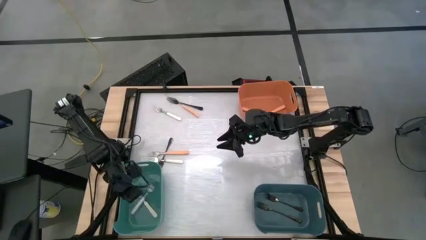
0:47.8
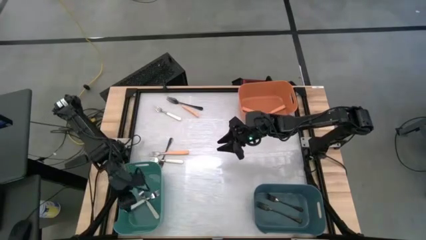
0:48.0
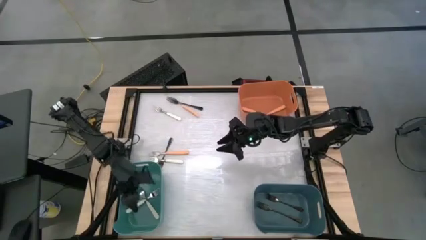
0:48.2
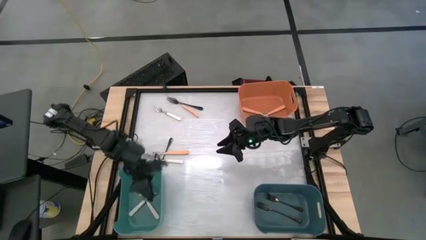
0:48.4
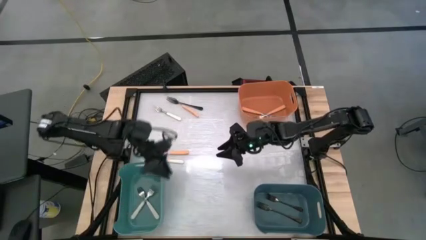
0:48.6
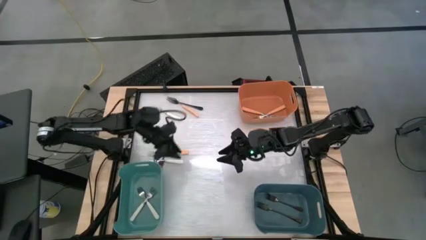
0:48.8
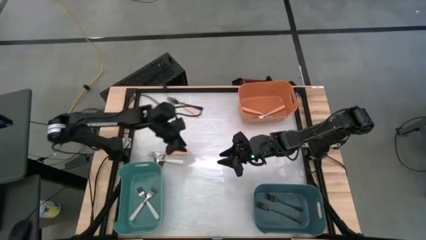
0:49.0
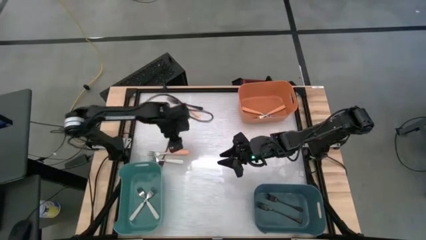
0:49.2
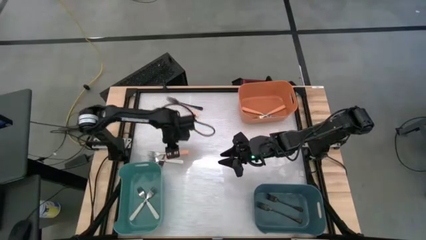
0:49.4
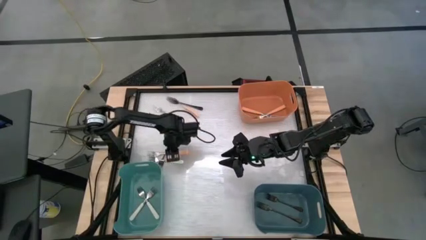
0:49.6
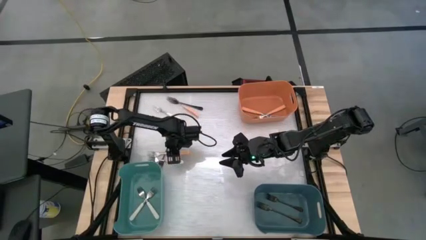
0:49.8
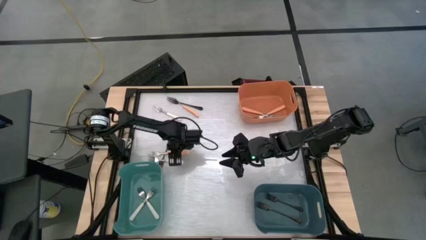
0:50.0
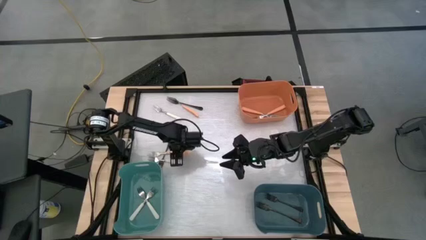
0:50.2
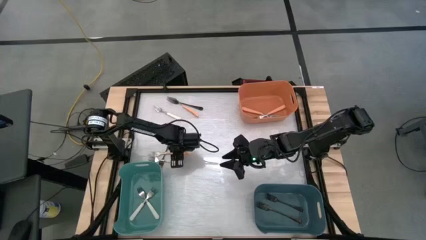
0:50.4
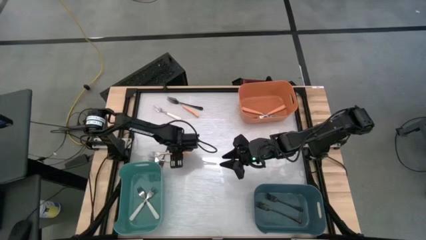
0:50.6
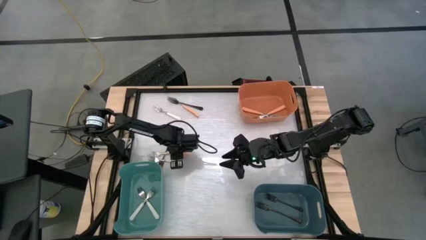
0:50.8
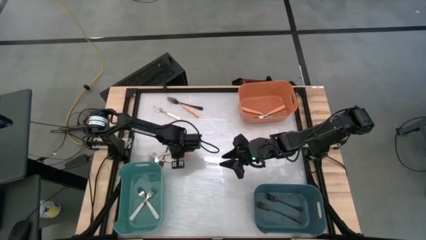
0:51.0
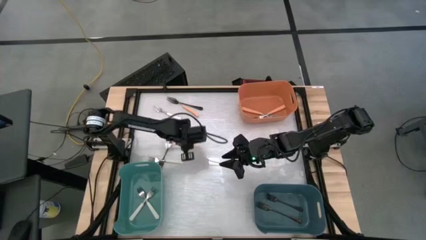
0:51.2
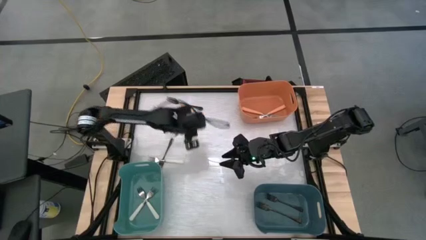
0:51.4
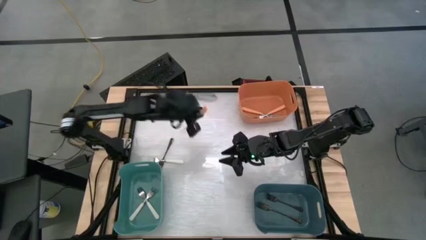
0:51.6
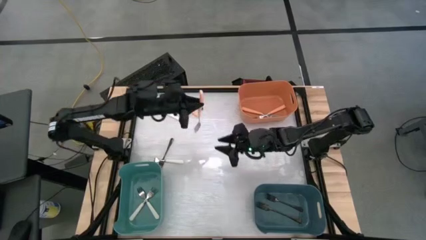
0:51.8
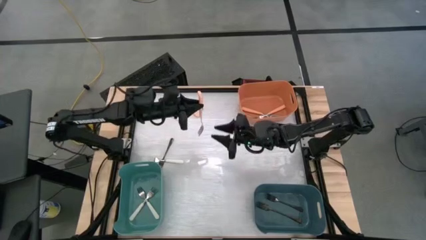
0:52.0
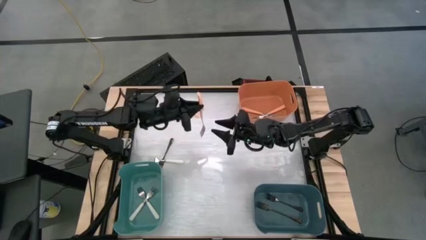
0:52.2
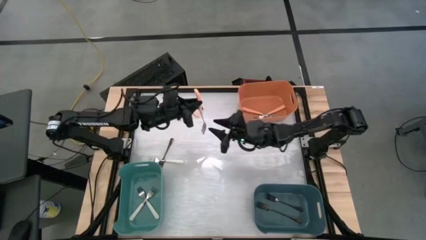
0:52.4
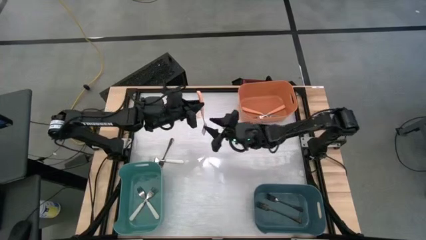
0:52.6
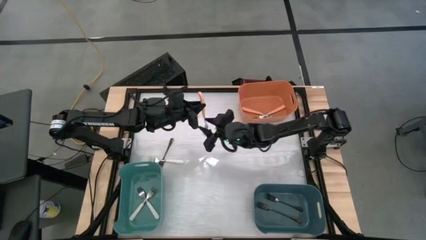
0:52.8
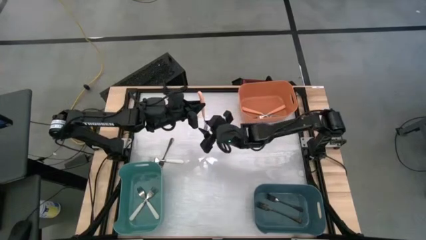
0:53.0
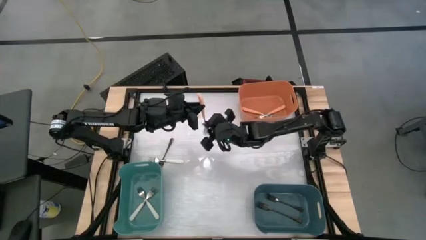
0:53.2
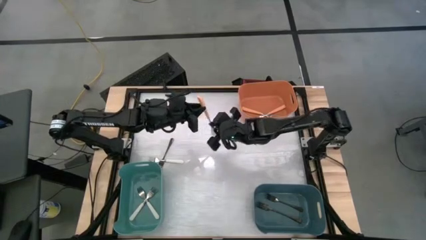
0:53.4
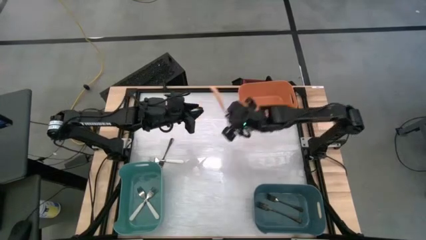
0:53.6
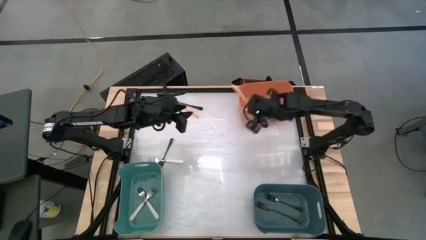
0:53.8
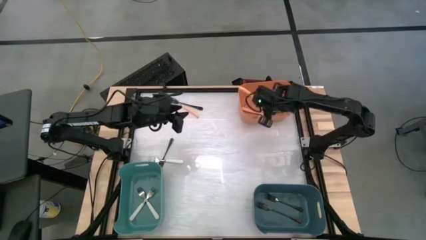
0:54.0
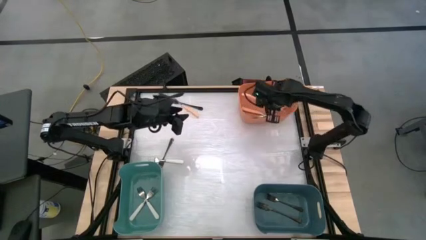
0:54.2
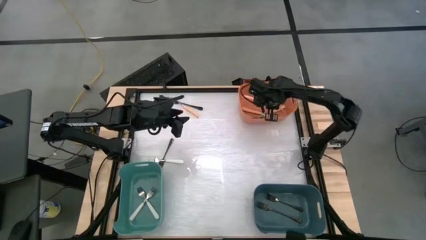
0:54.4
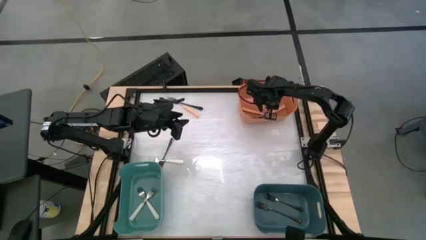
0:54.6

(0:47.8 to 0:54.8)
Task: Sort silverware by color (type)
Put the orange fork into the orange bin

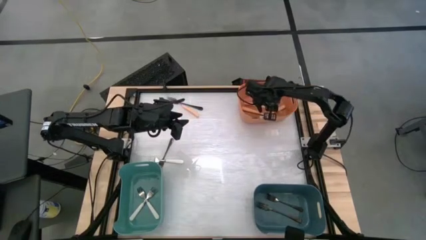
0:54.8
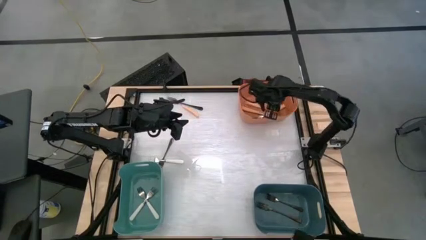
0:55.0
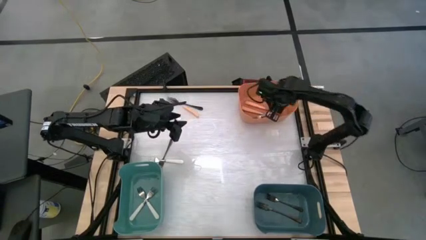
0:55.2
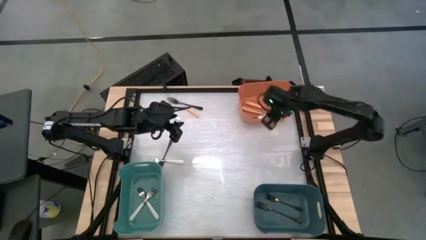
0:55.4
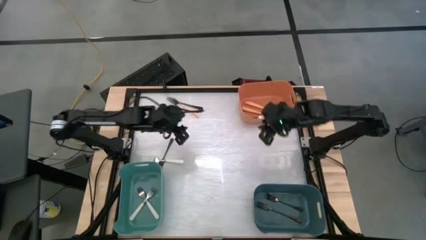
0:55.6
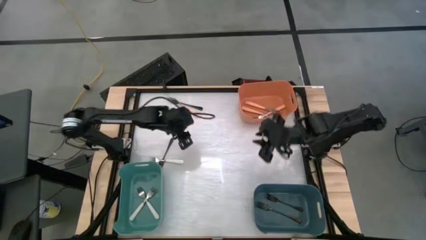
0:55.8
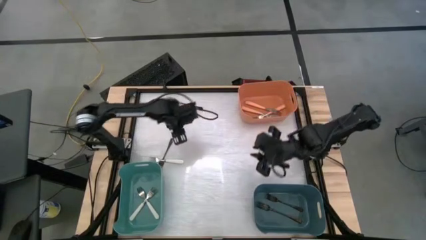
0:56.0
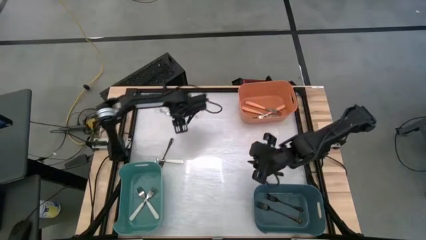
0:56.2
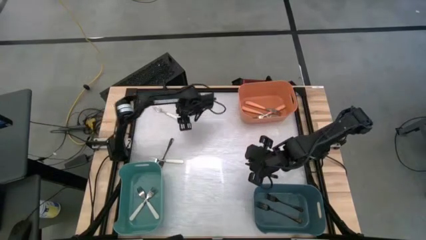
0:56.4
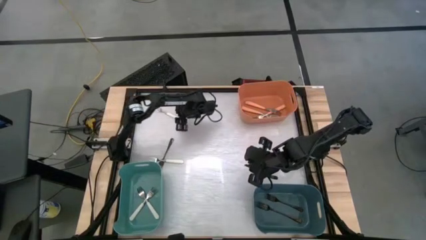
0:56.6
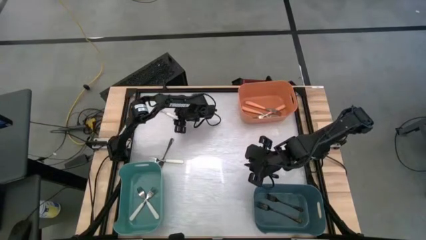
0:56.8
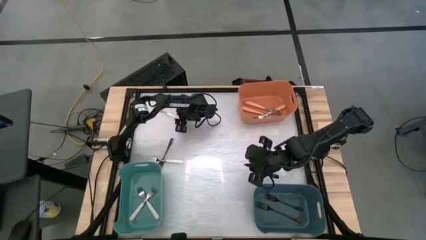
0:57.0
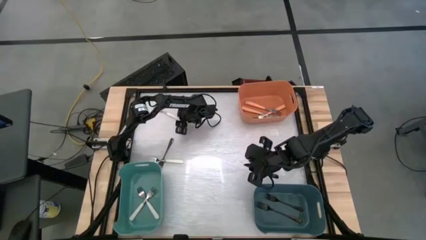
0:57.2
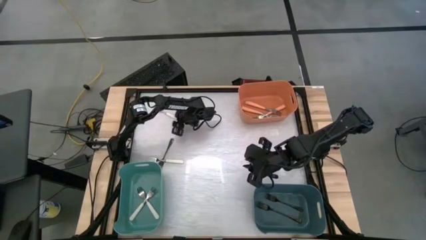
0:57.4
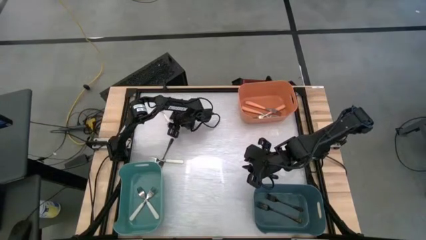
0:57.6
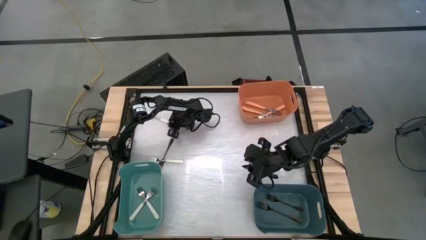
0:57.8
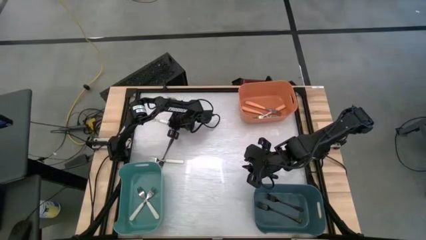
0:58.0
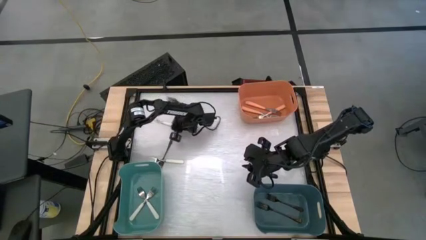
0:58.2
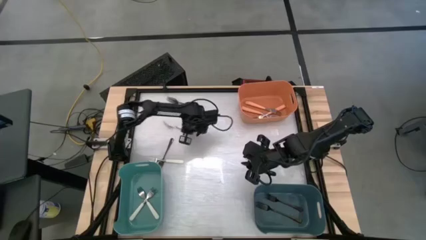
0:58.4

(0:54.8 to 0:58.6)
Put the white fork into the green bin

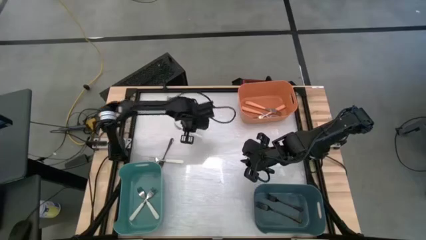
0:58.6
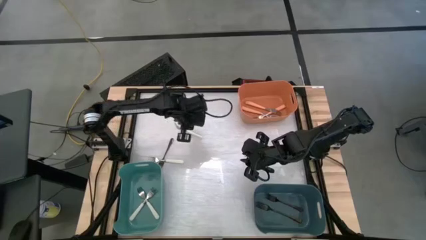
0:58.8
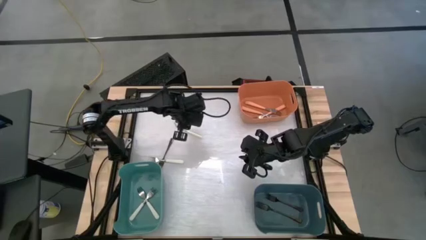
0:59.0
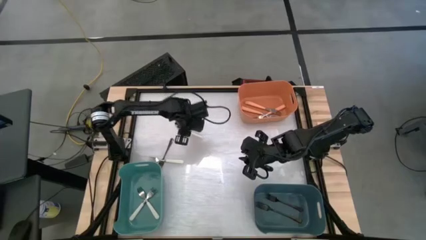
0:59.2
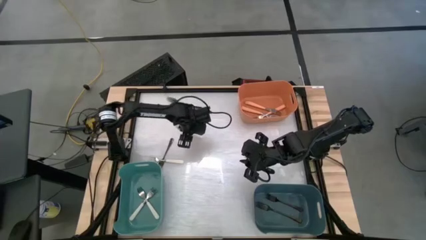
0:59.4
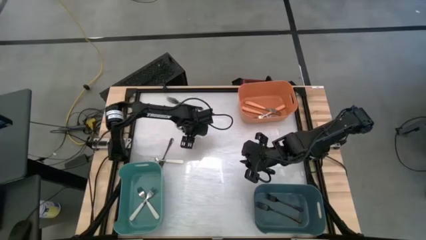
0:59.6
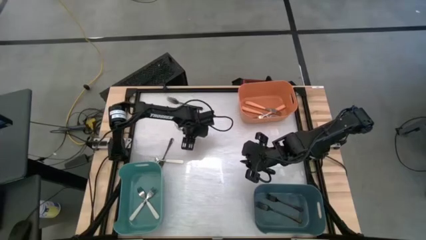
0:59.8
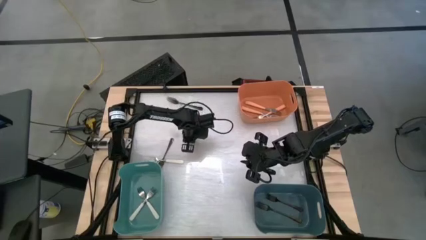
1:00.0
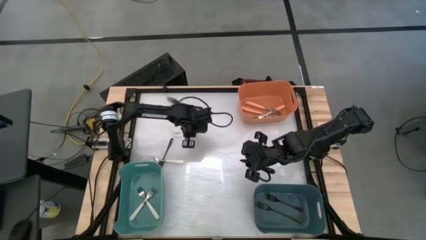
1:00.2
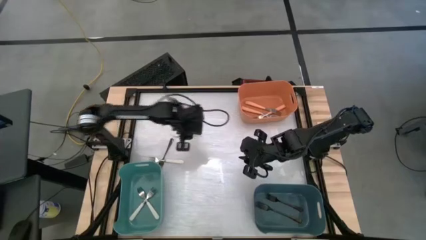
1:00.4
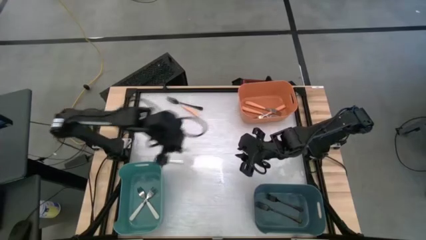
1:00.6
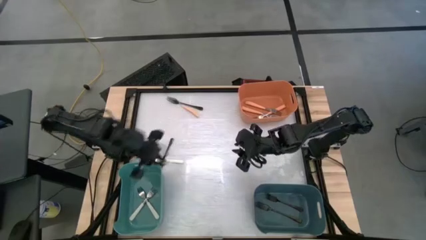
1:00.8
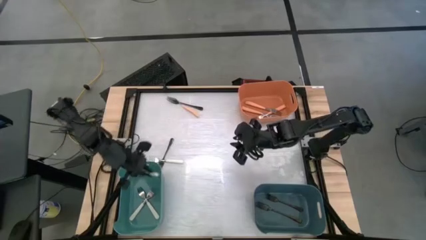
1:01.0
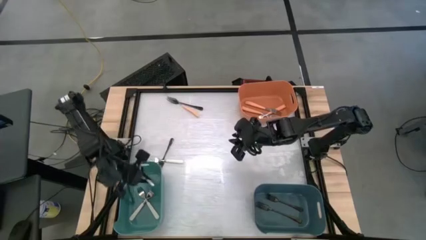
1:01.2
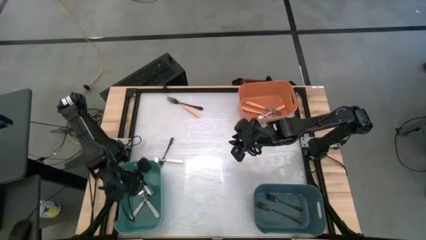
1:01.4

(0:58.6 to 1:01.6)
Put the white fork into the green bin
